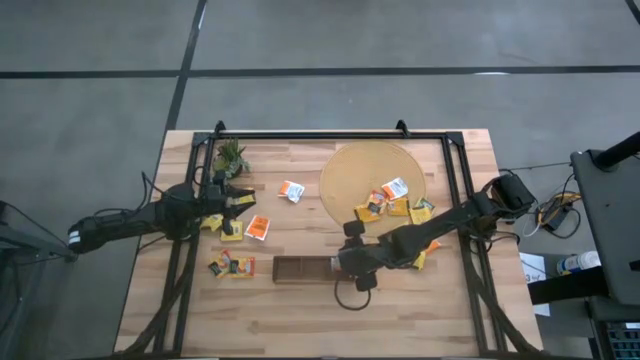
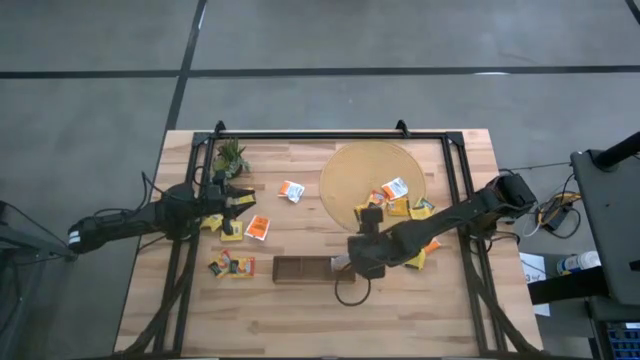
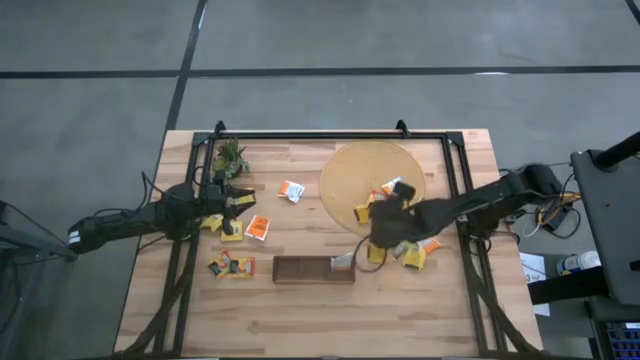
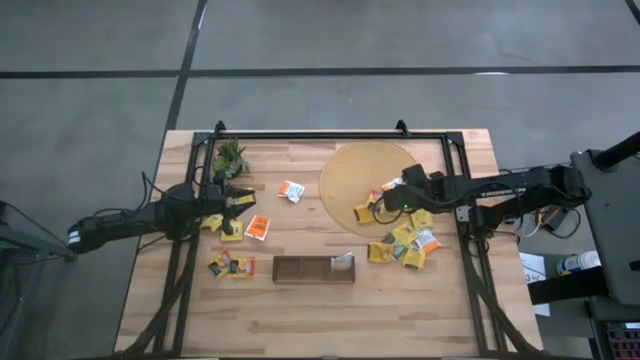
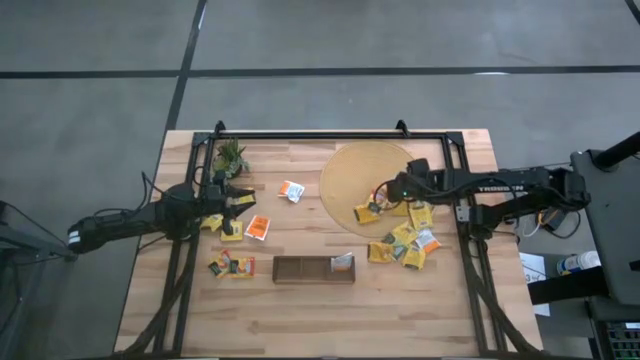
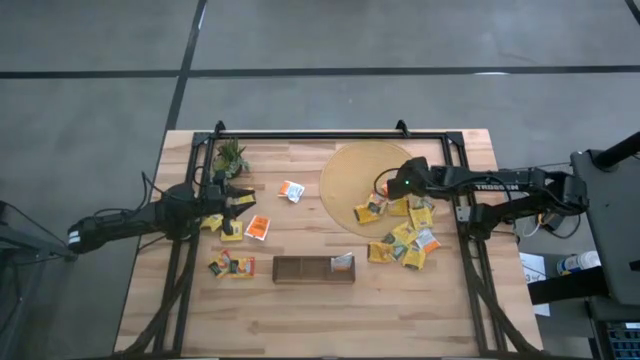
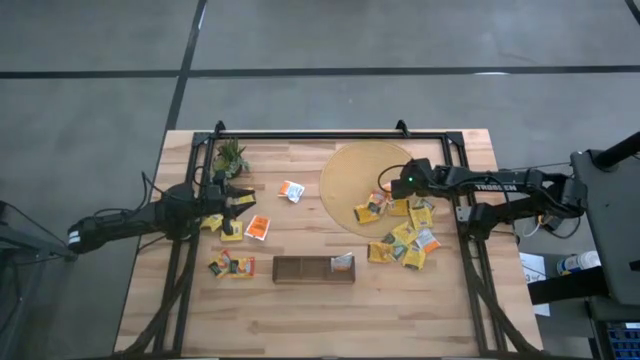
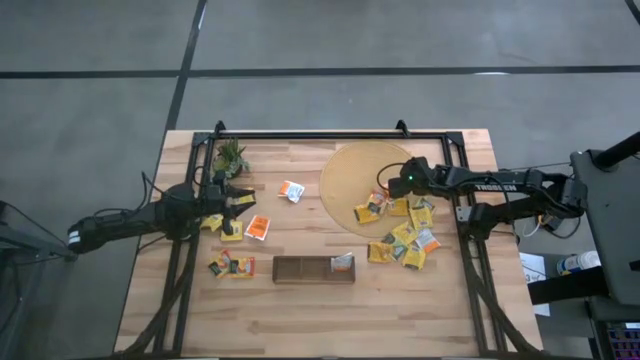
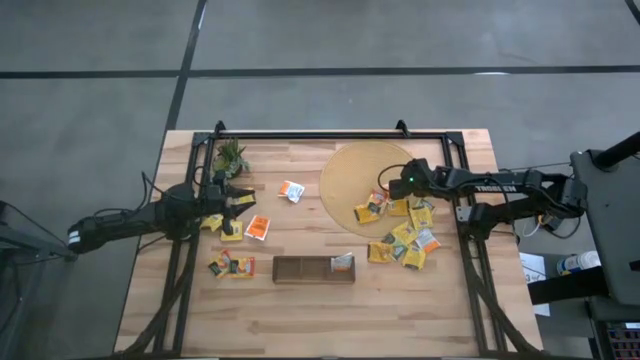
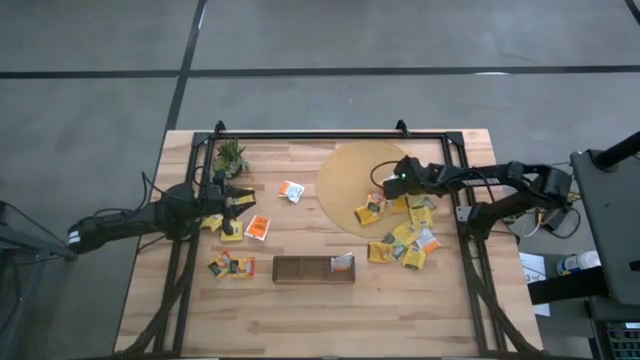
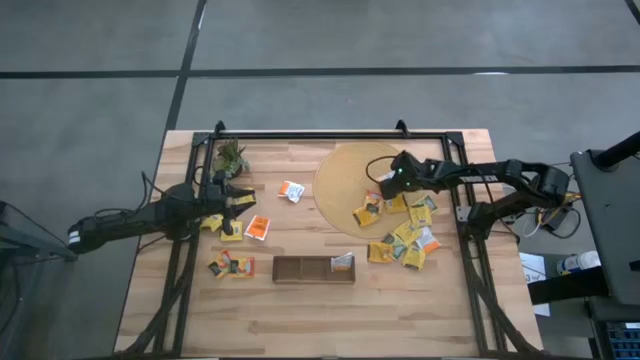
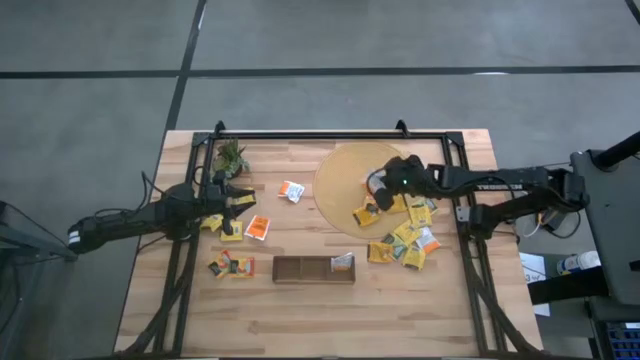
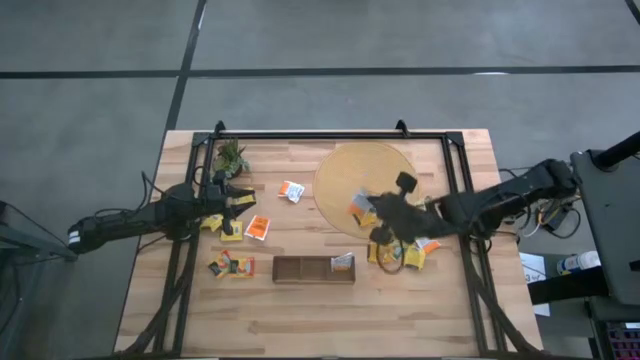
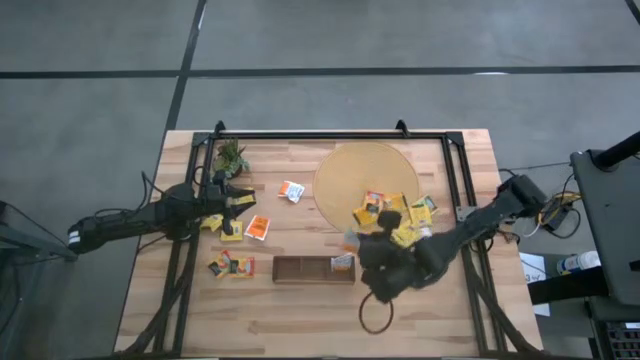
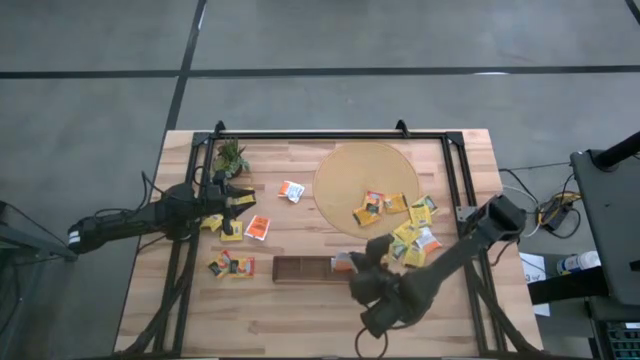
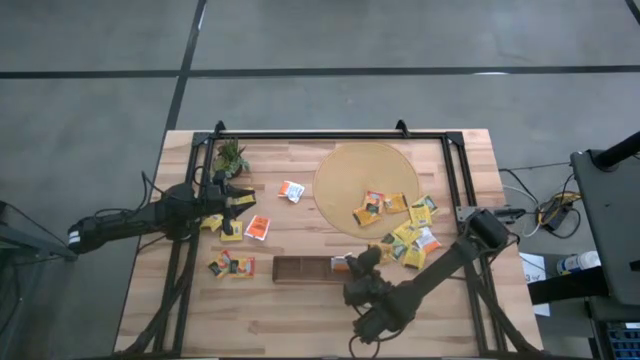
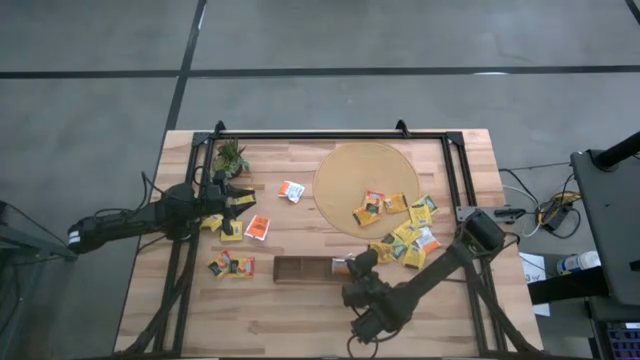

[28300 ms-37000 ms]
Task: Pick & Place Tea
Put the white tea bag into the right section of the wooden organizer

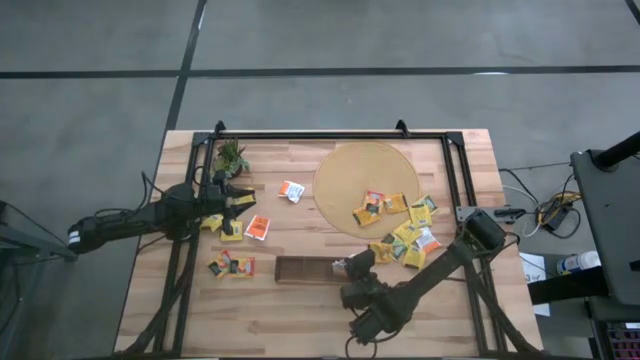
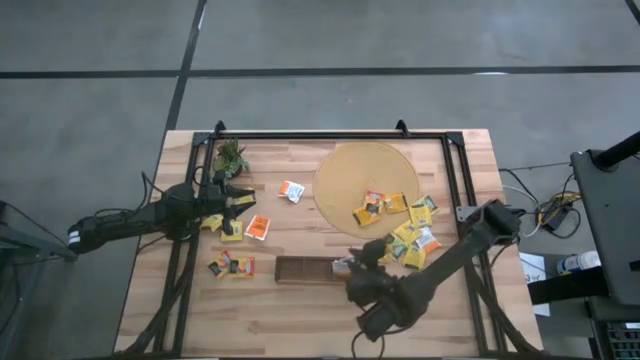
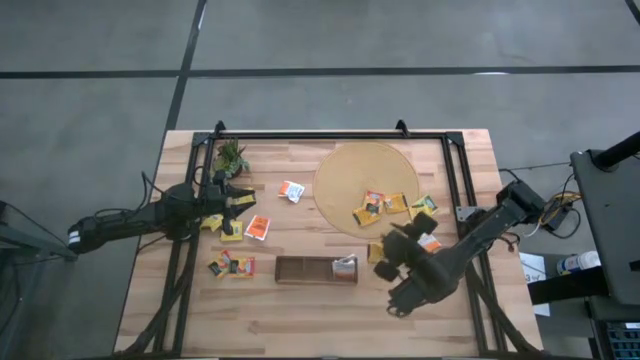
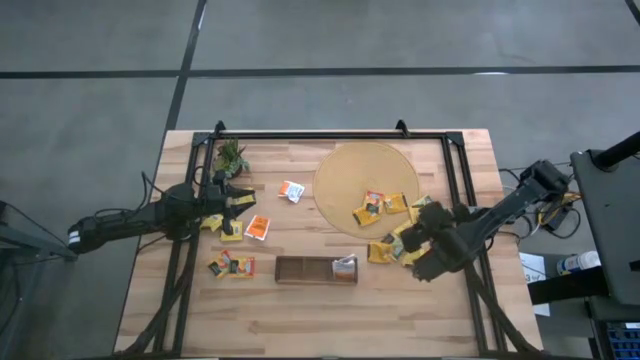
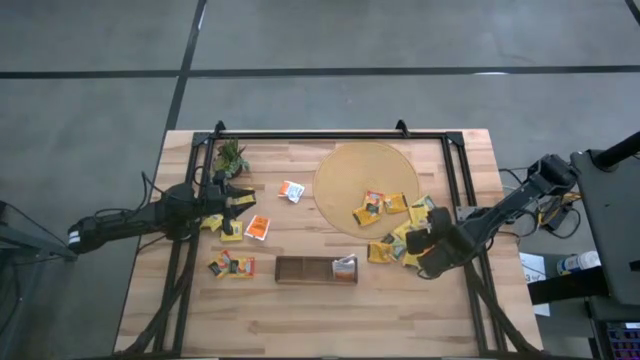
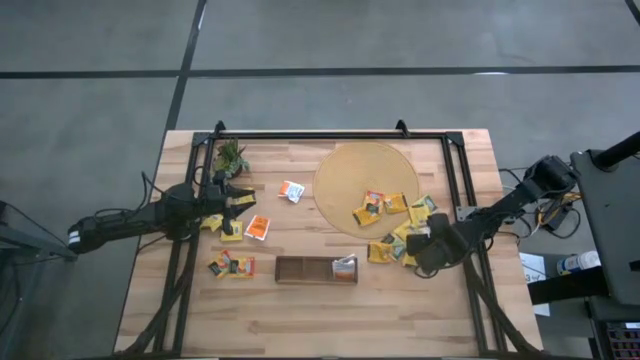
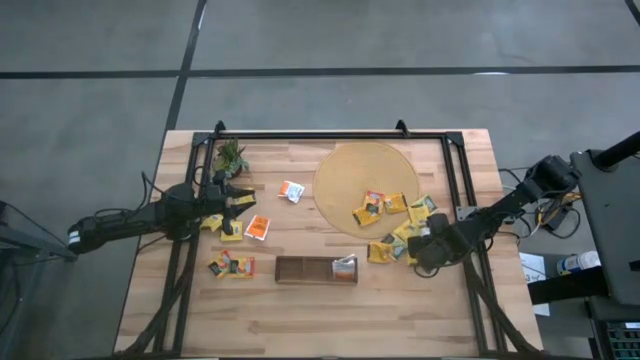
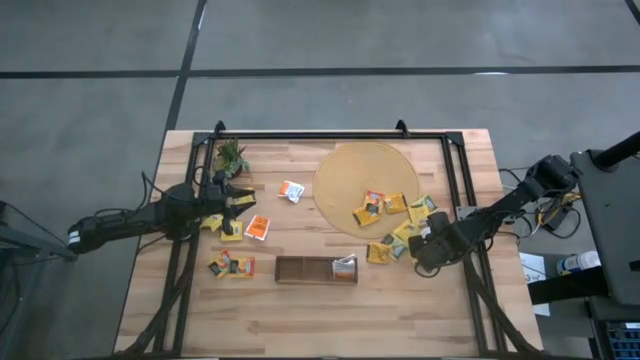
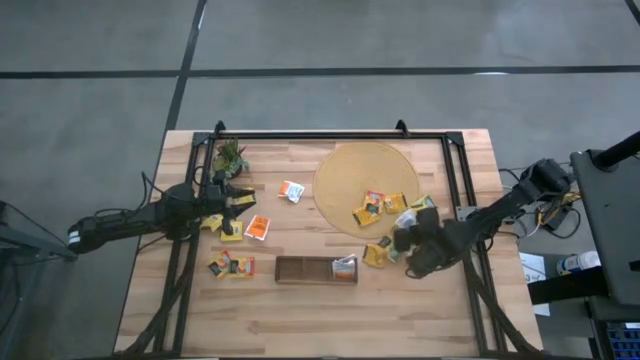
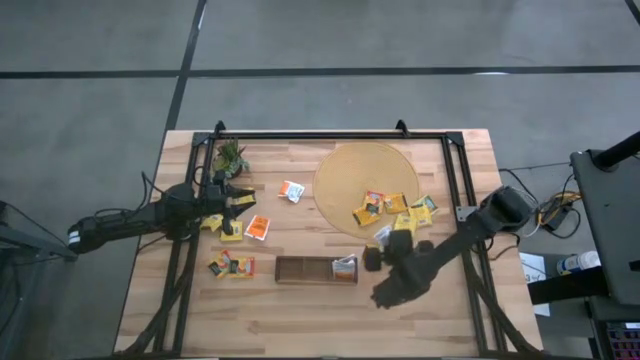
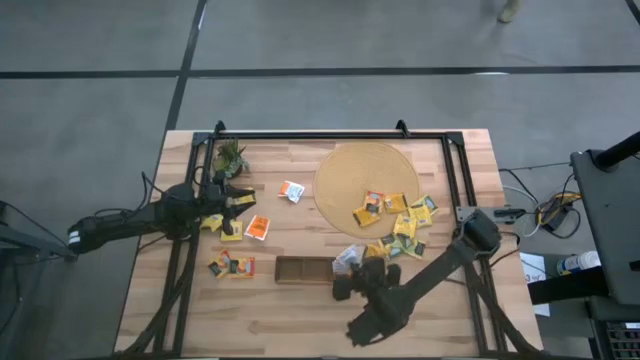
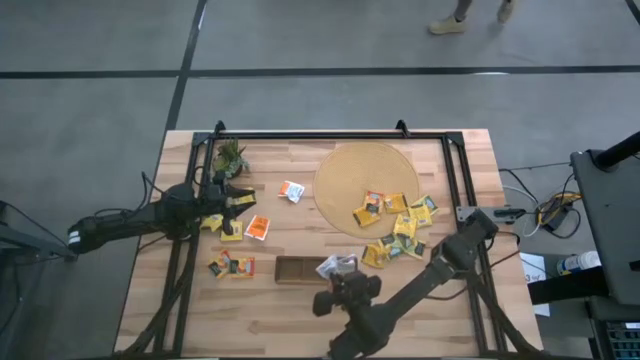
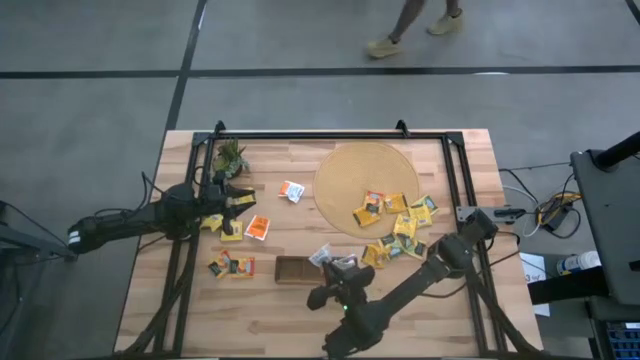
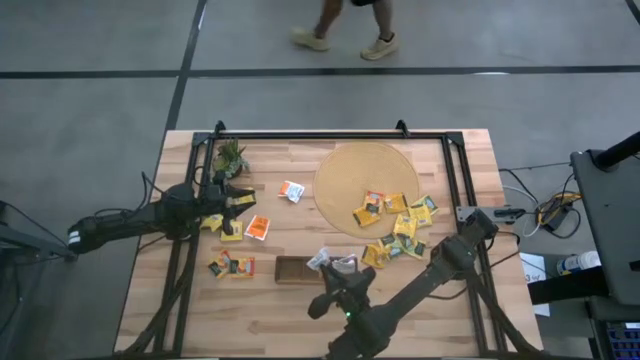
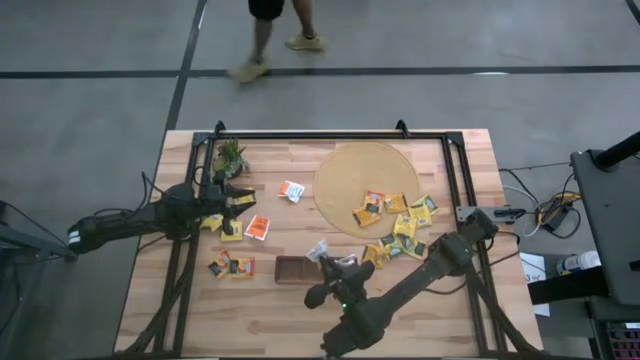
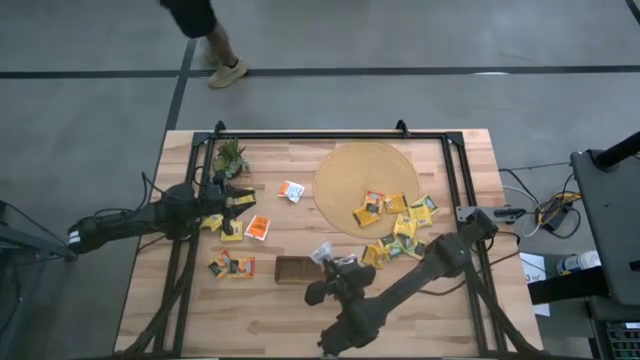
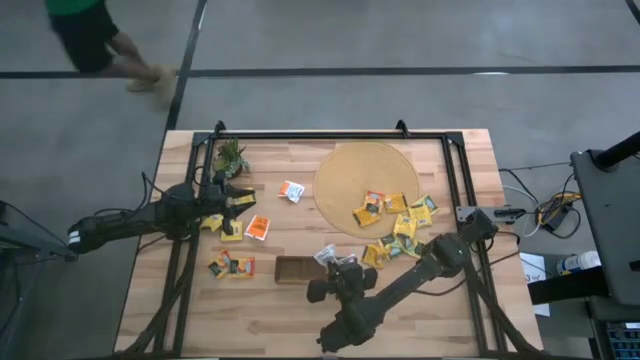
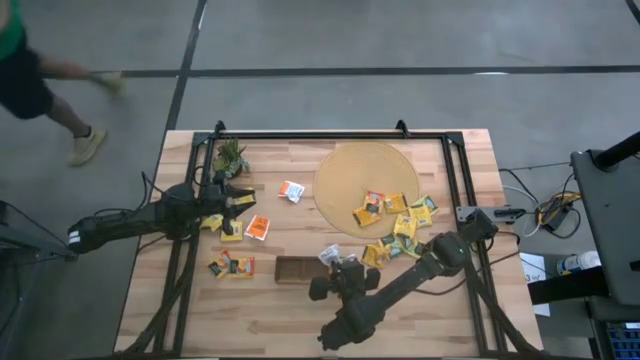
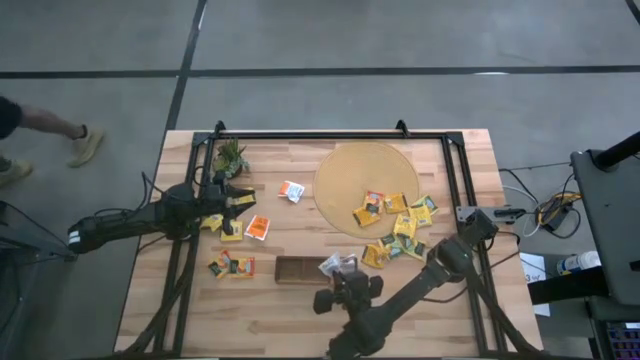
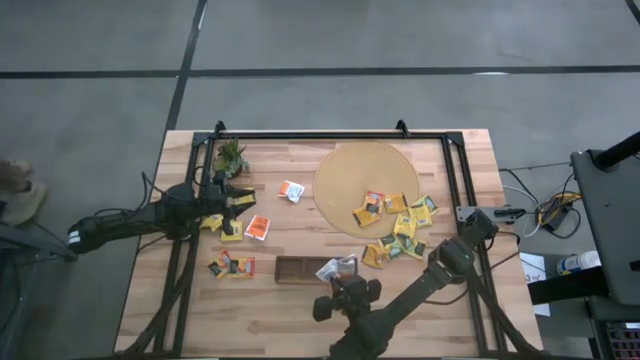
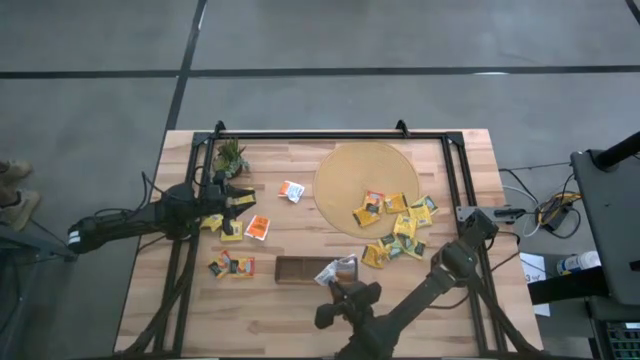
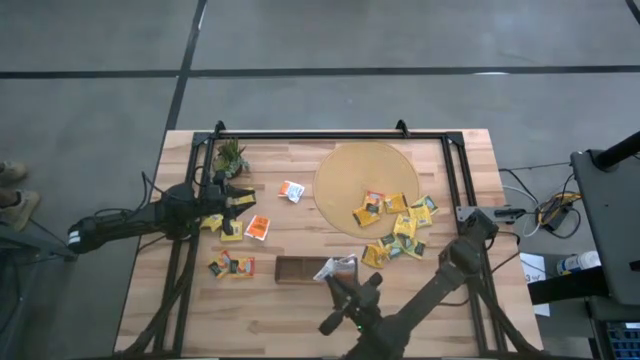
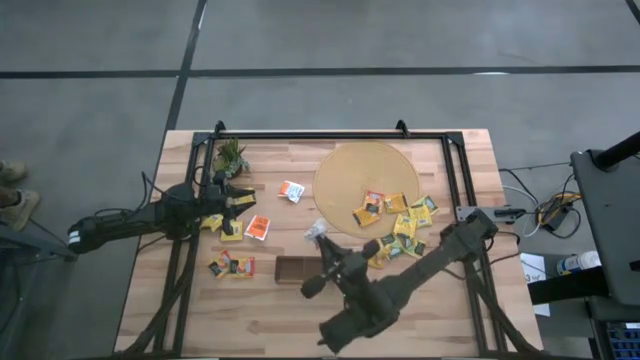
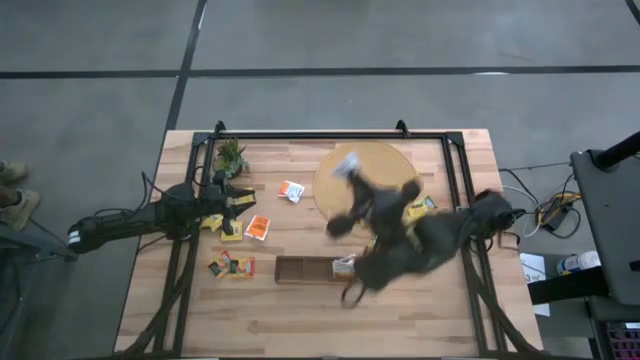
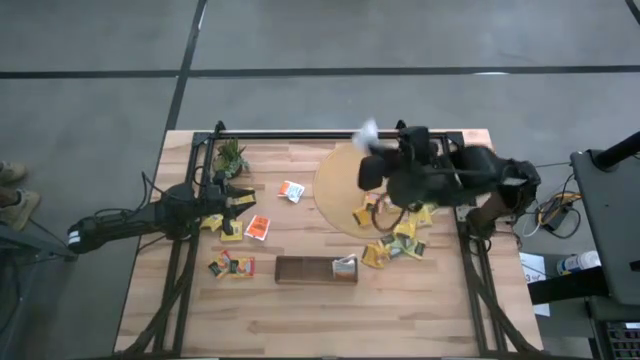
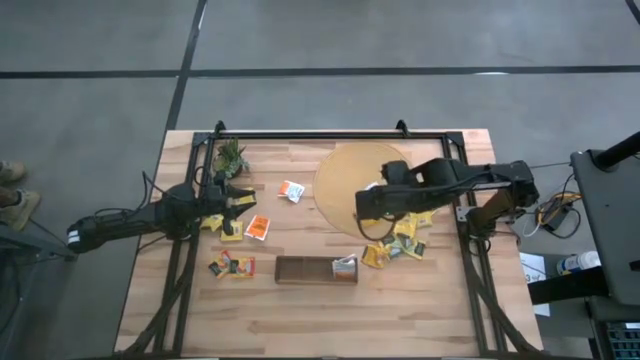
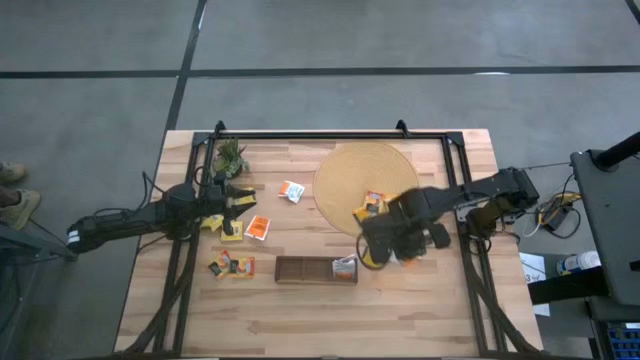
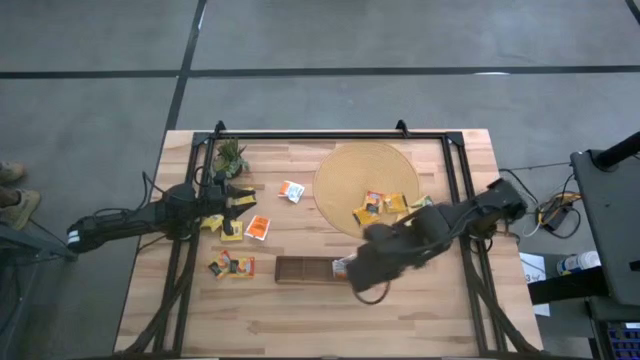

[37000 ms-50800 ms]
Put the white tea bag into the right section of the wooden organizer
